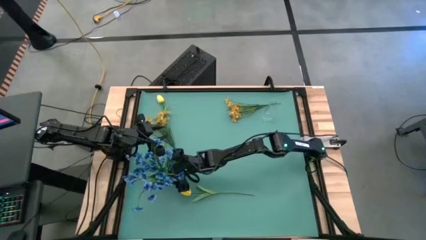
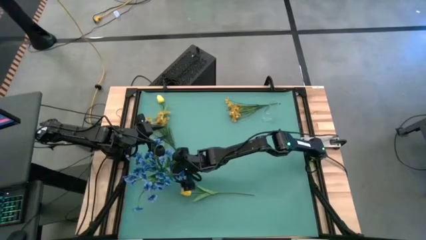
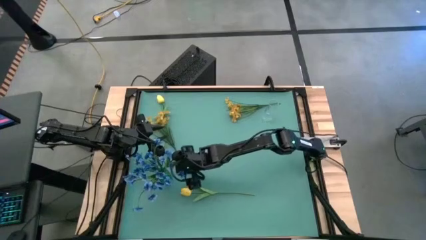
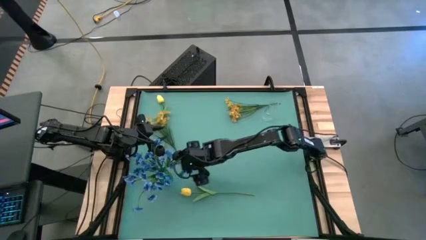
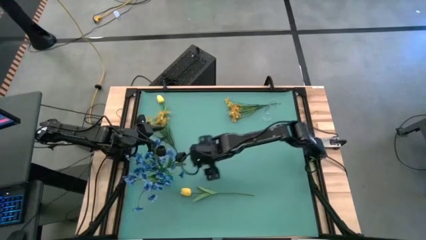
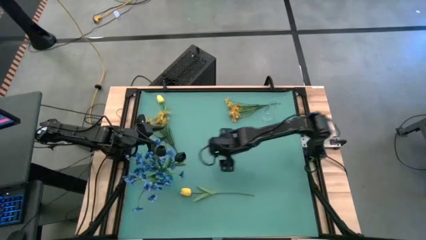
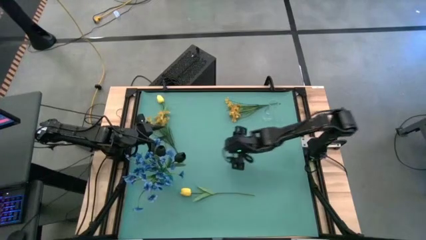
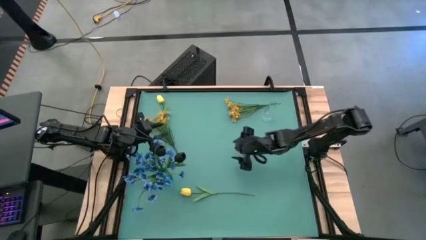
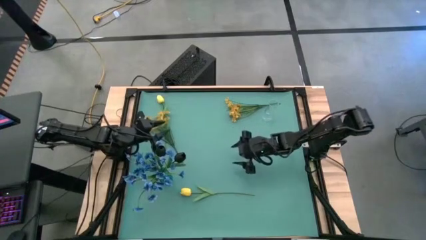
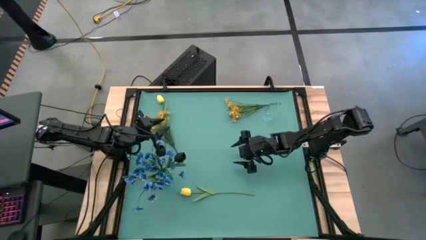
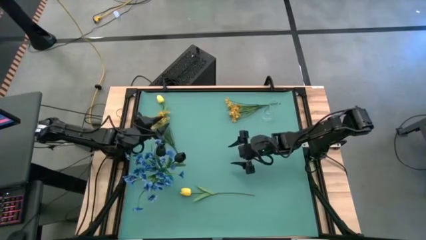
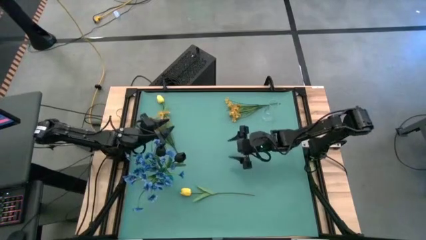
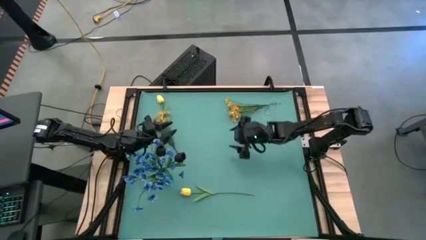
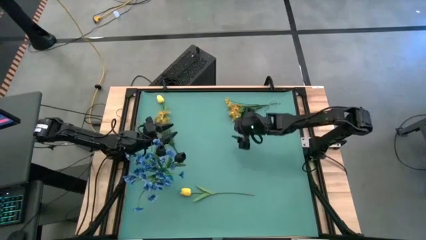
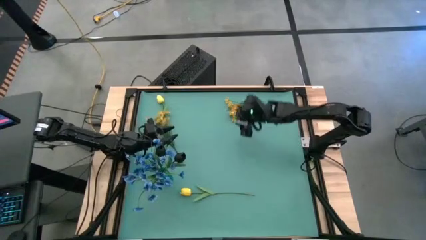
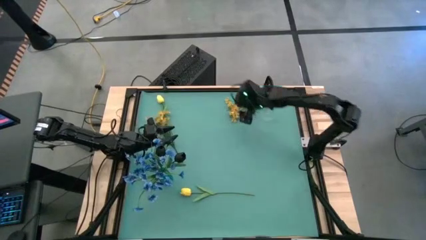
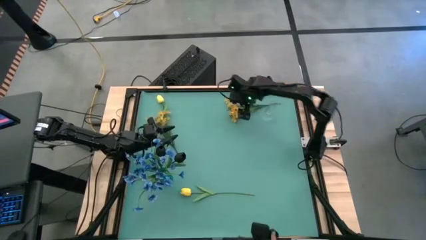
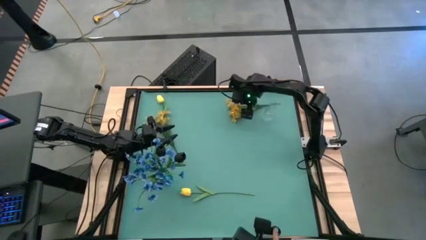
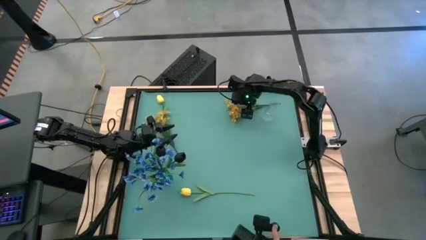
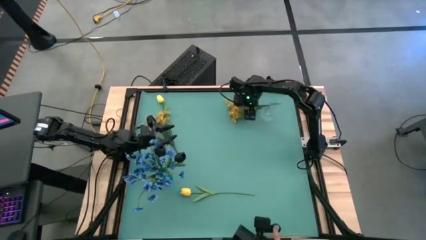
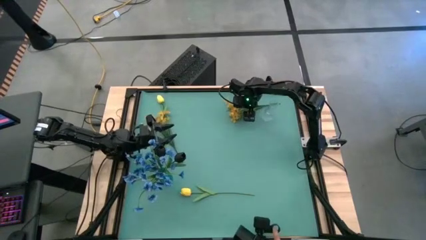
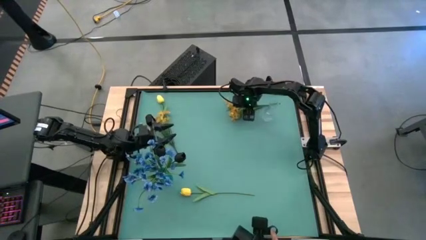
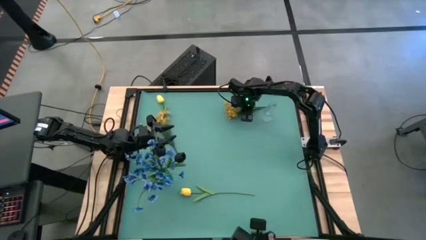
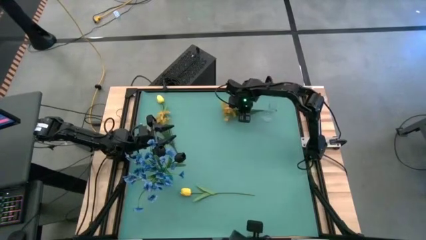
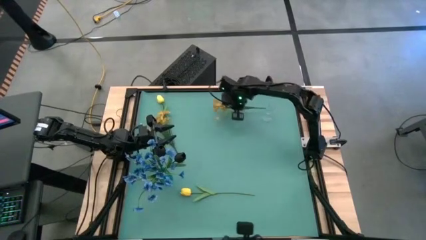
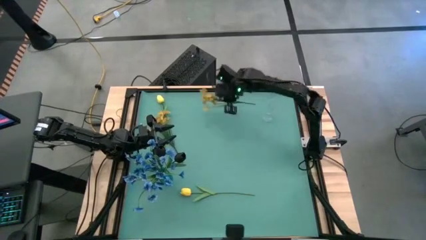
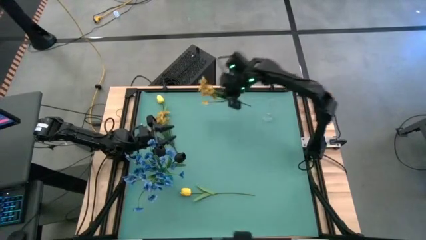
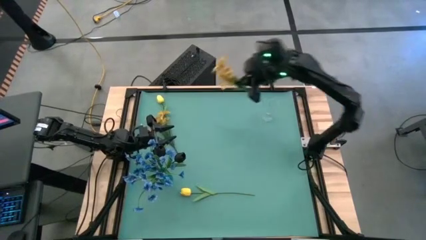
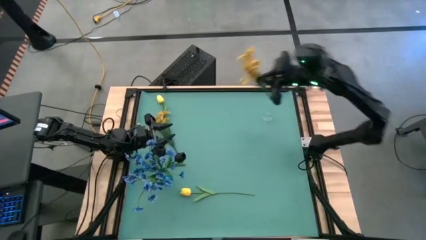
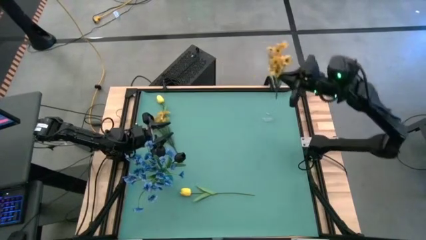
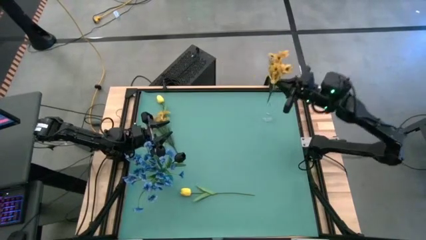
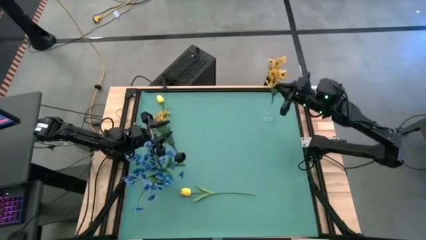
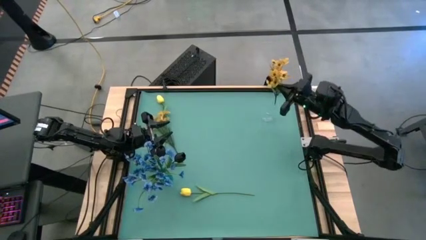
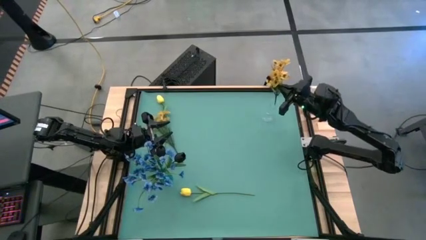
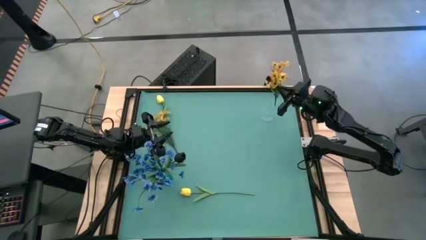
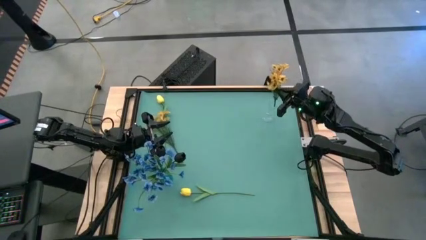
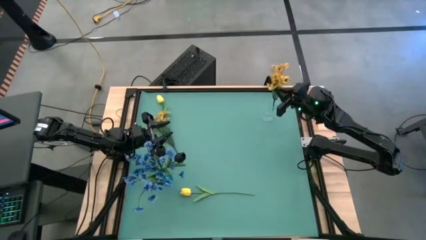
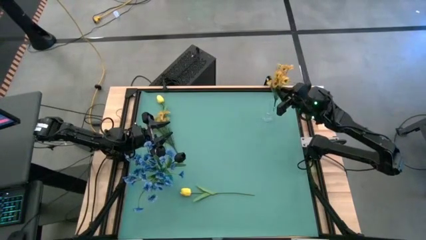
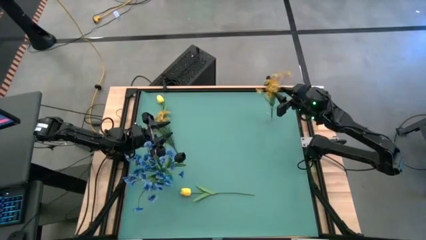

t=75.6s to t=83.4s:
Task: Sort flowers into vase by color
Put the right yellow flowers into the transparent flower vase

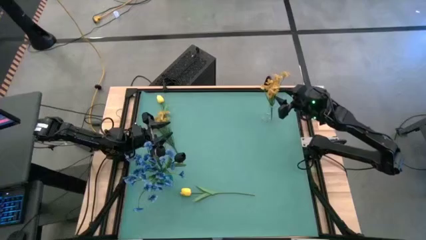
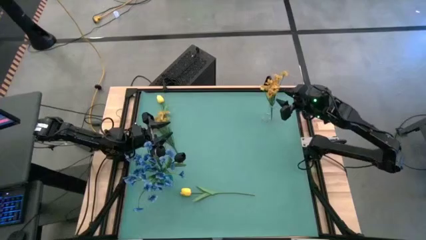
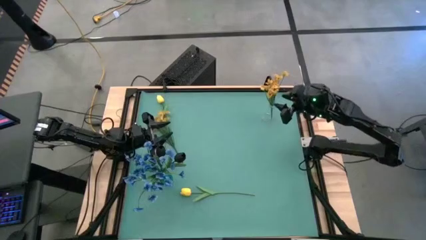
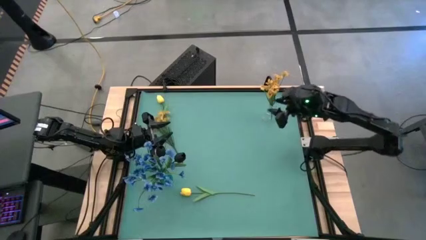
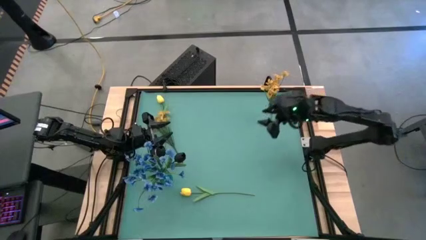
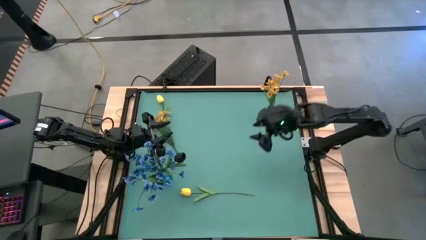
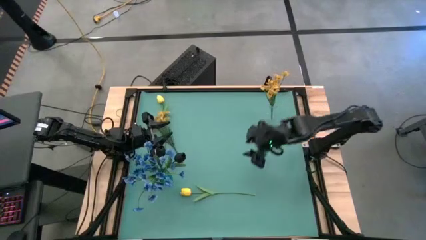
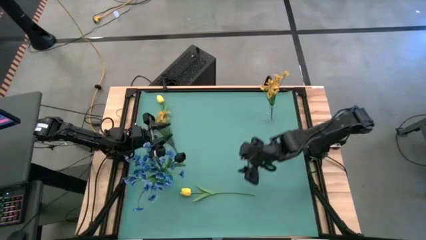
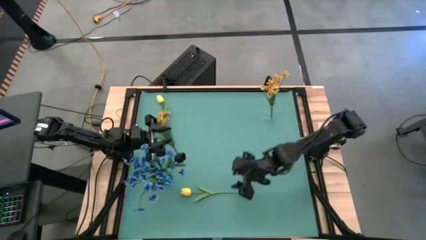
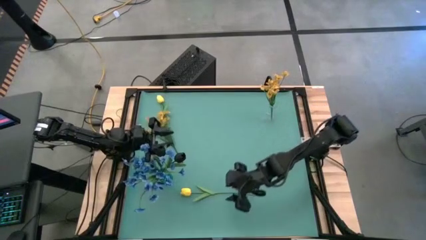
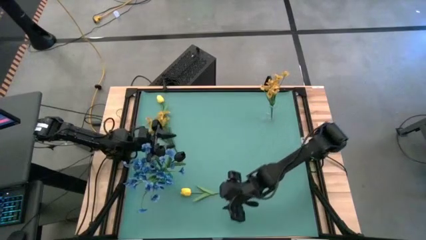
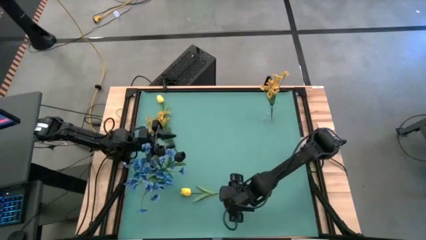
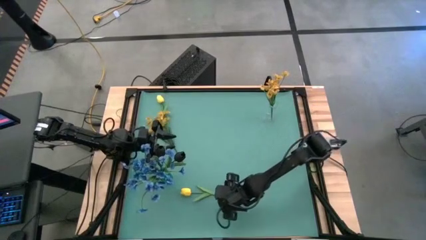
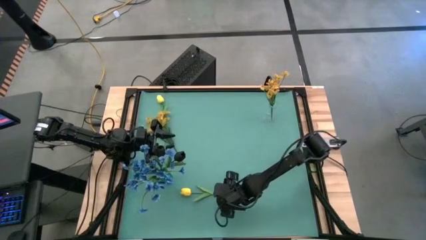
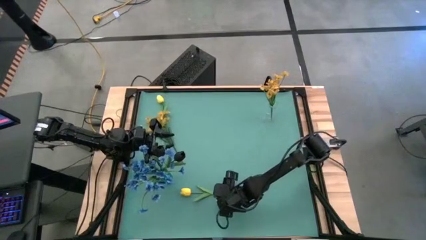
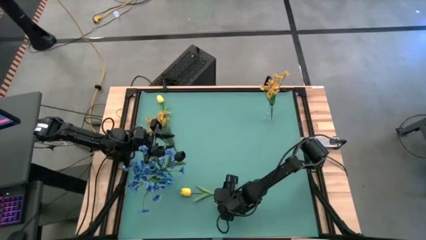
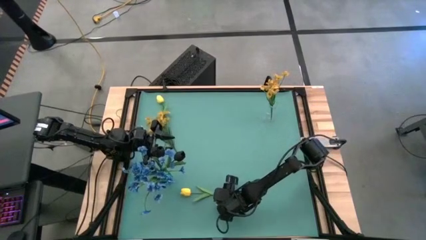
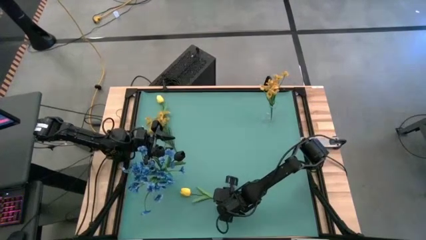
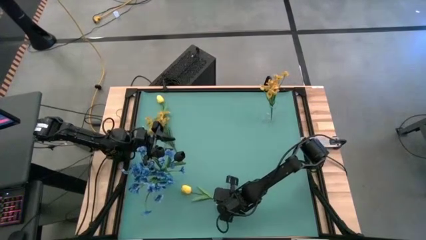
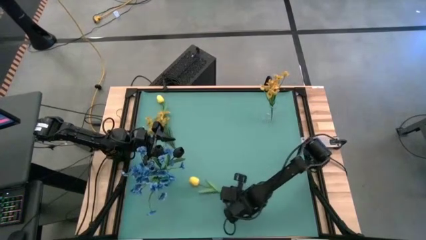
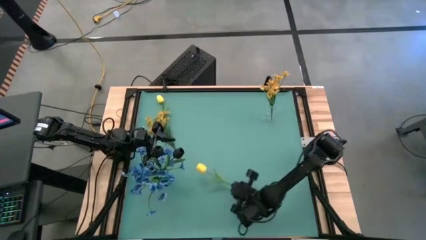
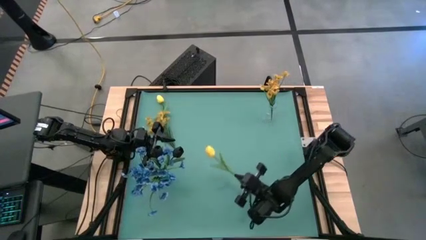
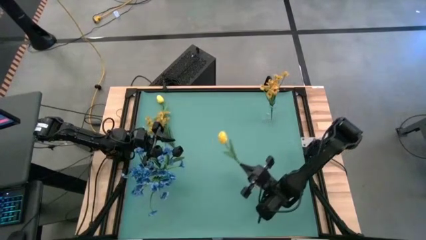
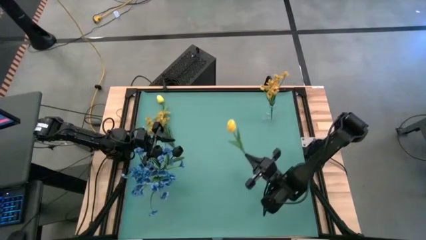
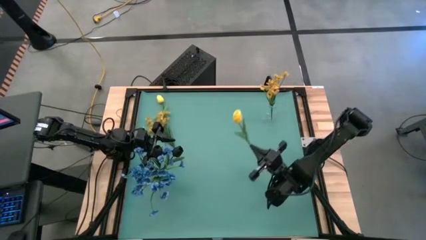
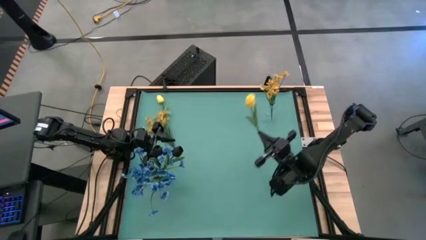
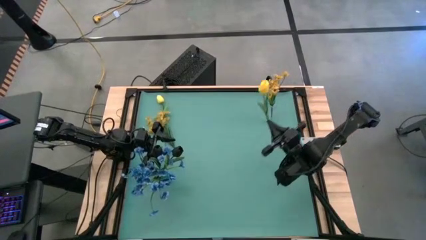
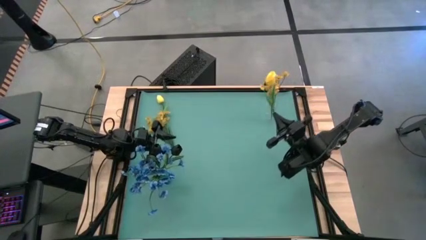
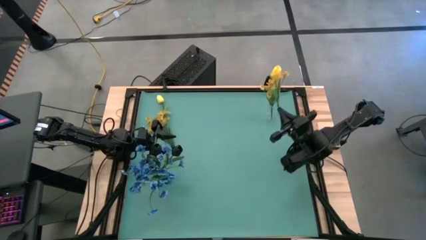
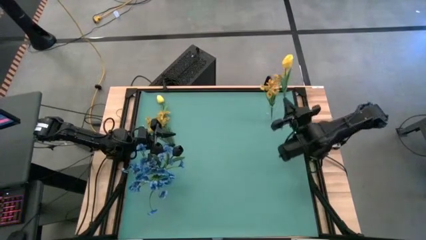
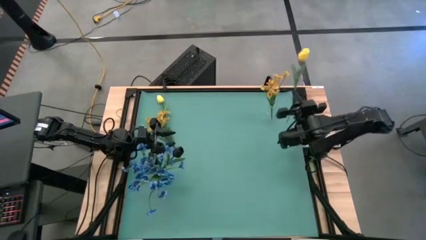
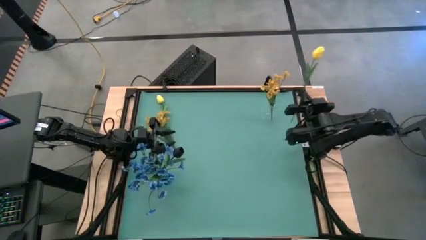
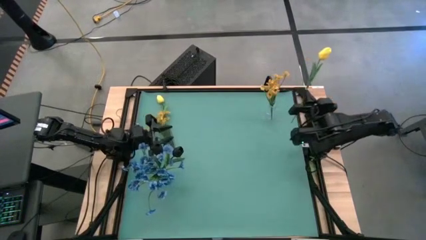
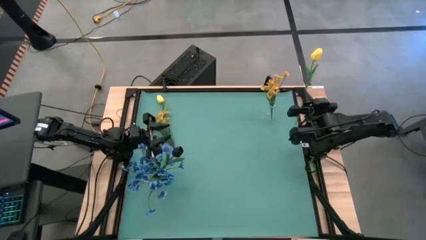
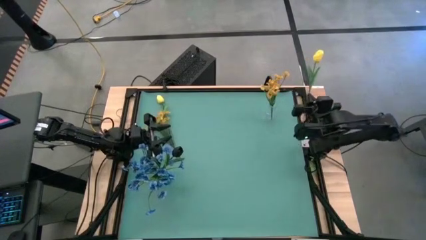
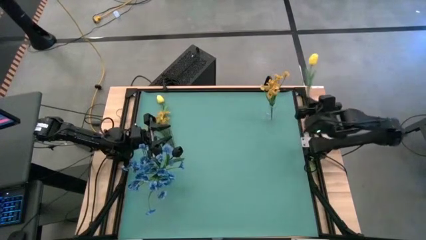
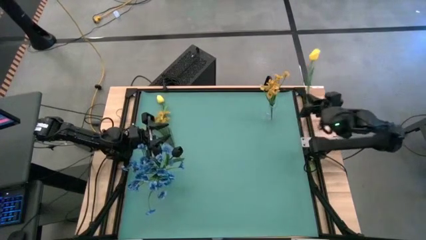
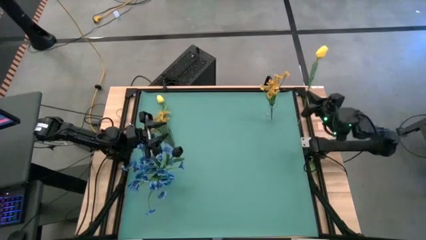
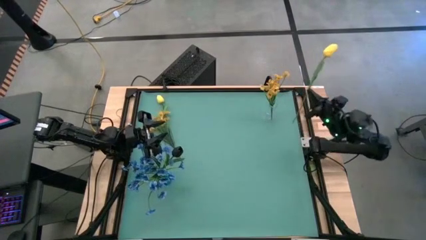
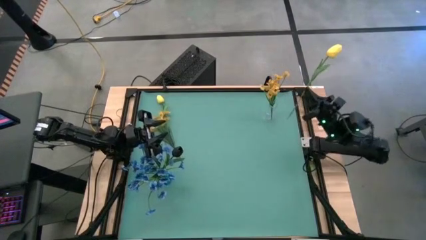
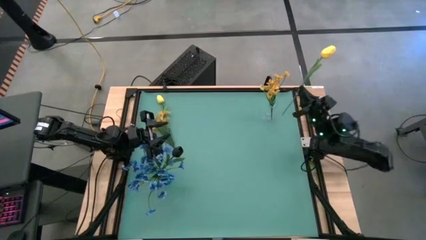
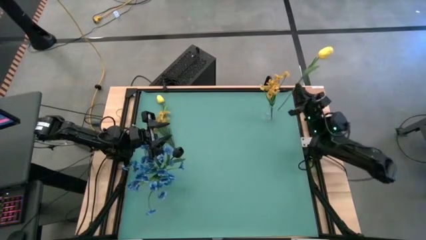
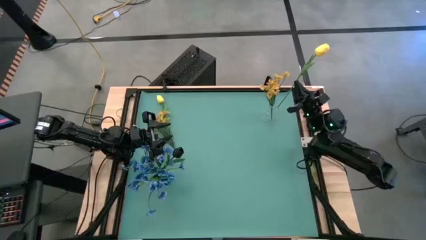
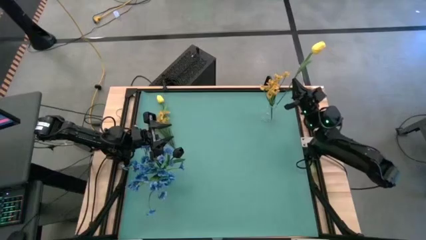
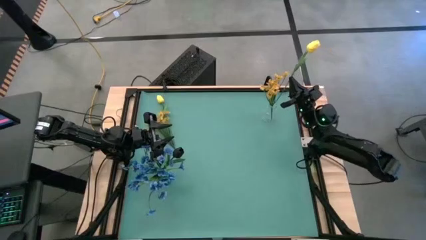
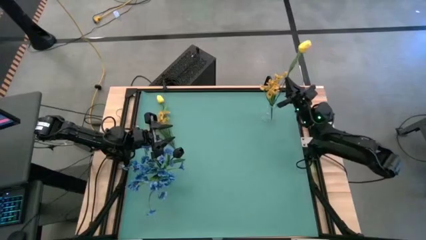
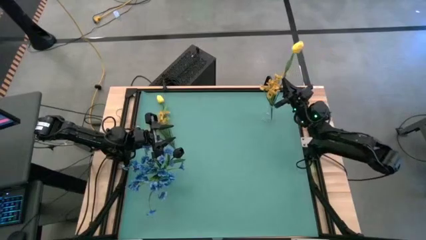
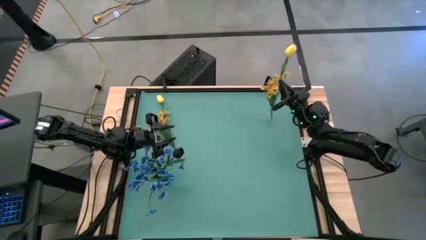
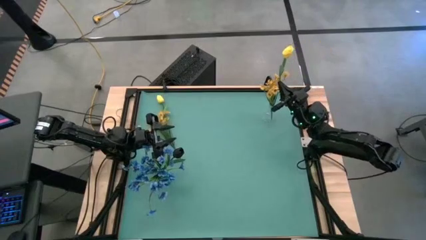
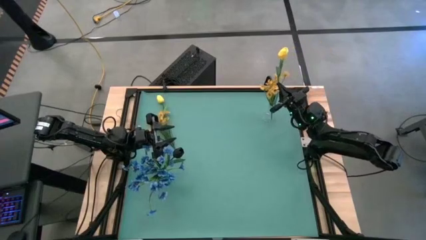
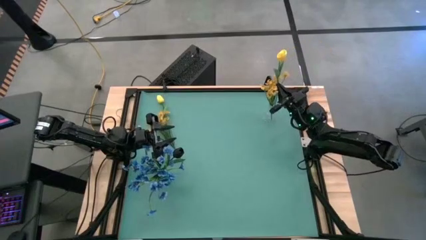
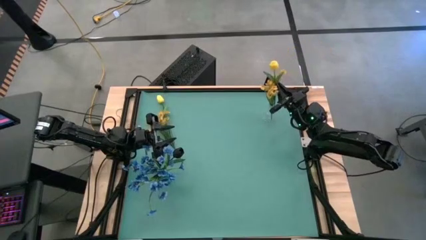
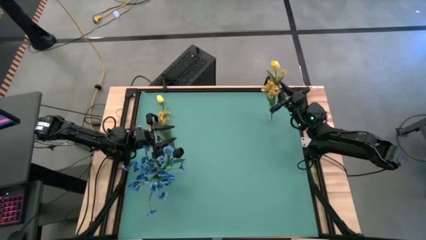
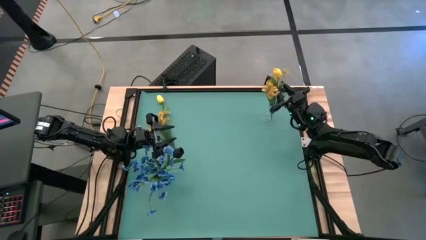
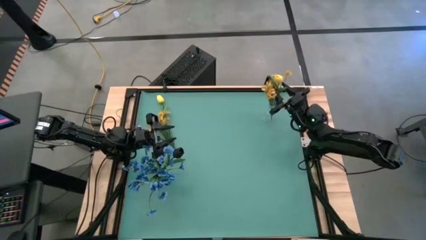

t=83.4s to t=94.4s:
Put the bottom yellow flower into the transparent flower vase
